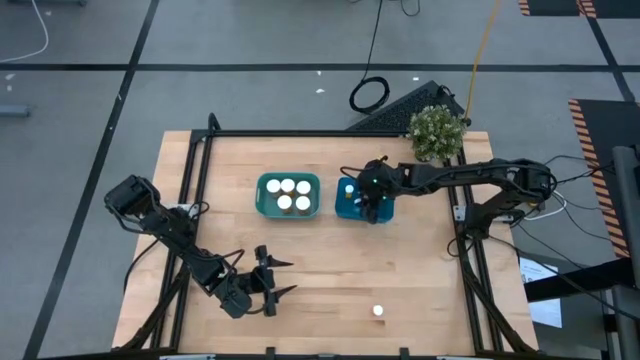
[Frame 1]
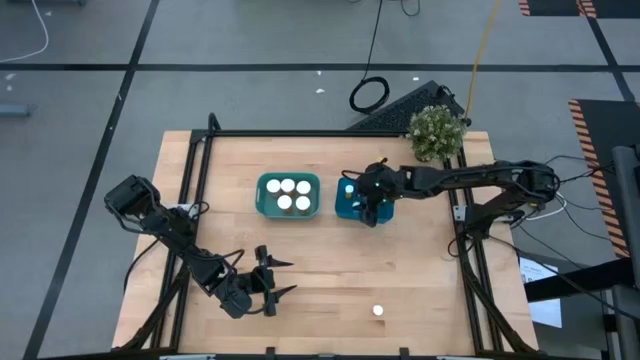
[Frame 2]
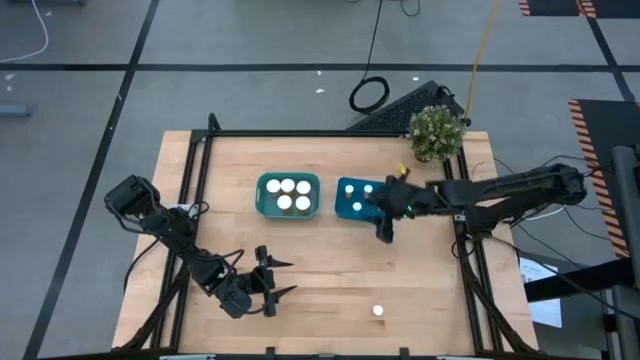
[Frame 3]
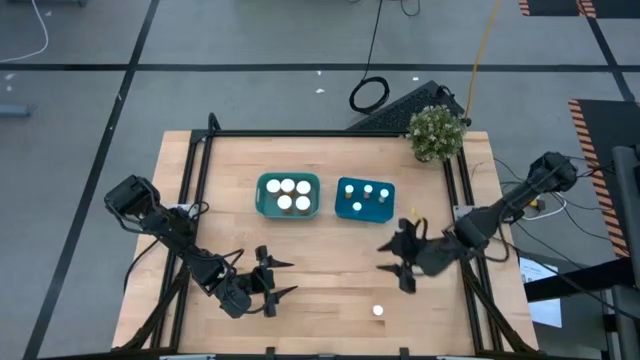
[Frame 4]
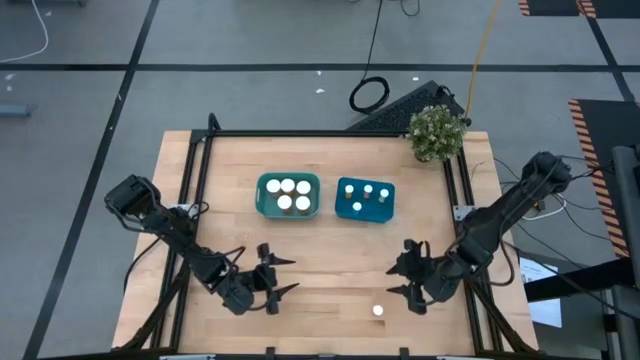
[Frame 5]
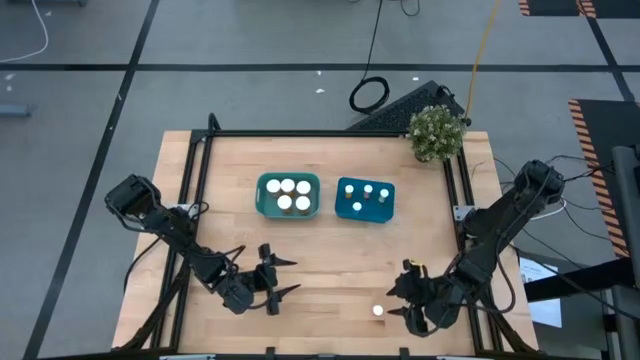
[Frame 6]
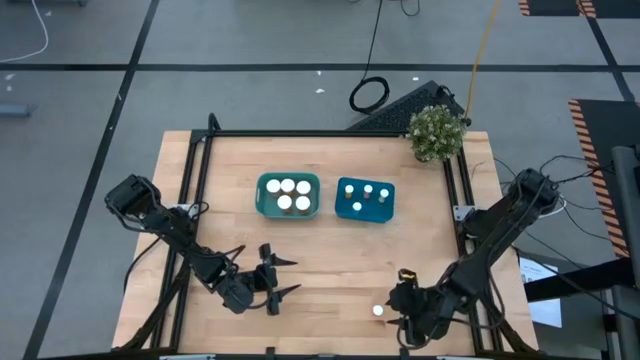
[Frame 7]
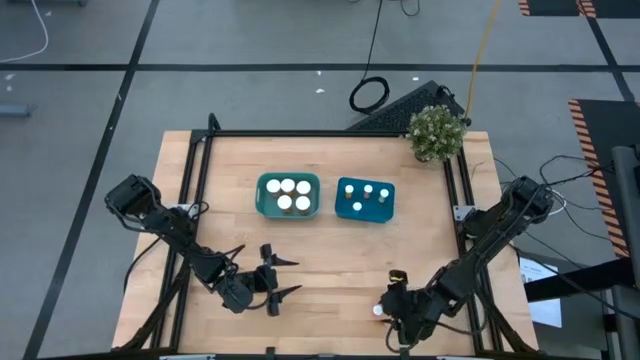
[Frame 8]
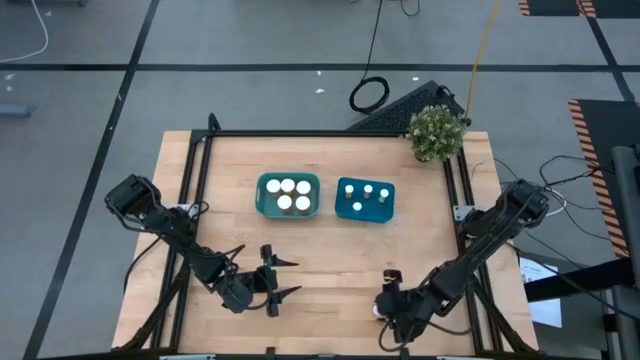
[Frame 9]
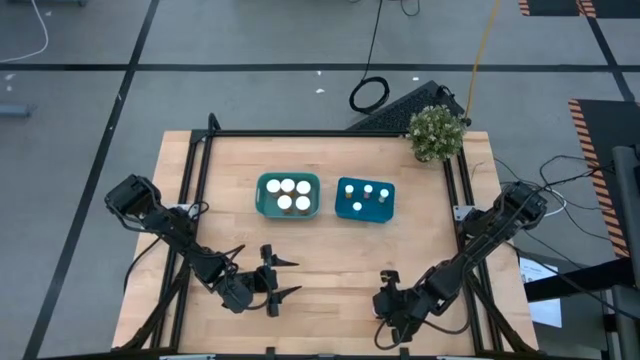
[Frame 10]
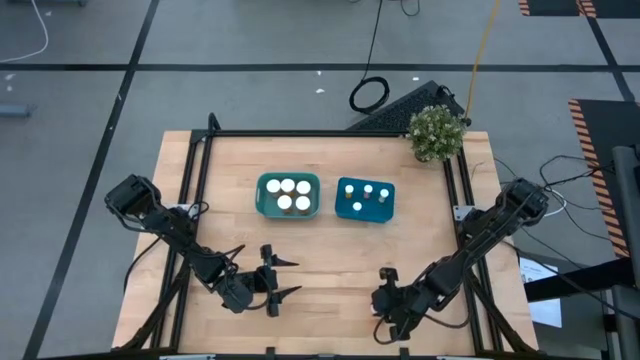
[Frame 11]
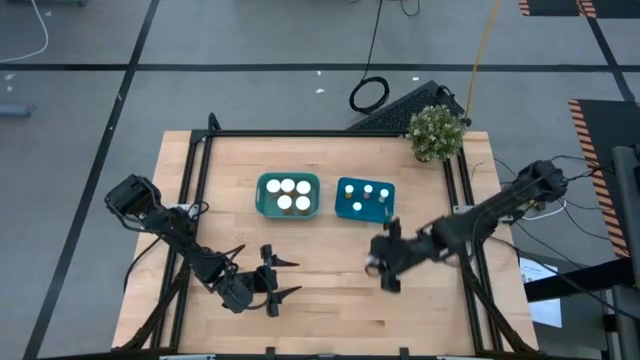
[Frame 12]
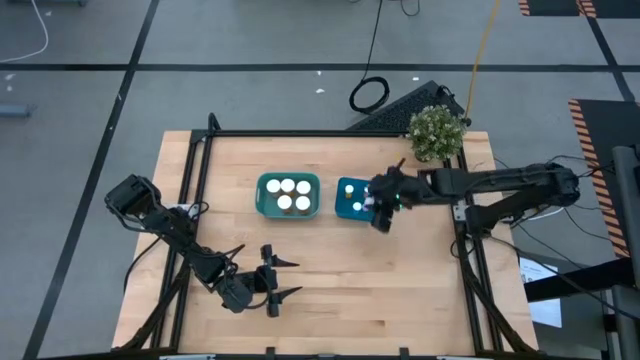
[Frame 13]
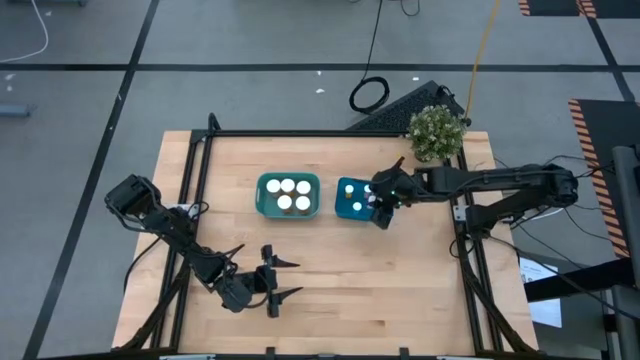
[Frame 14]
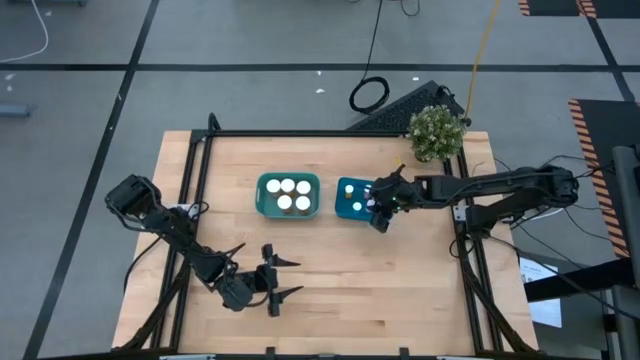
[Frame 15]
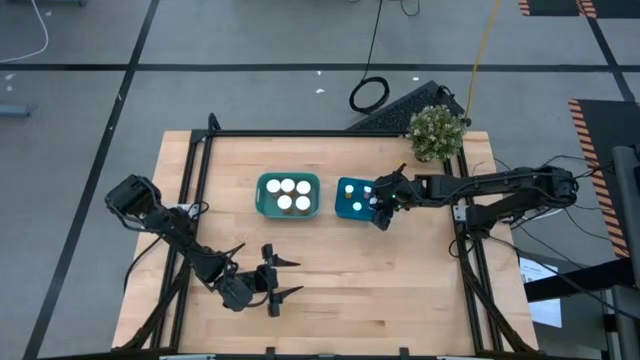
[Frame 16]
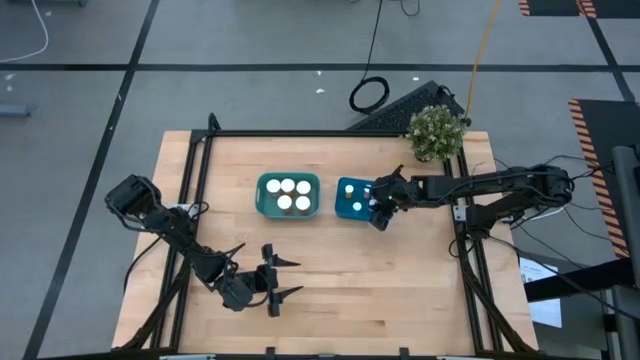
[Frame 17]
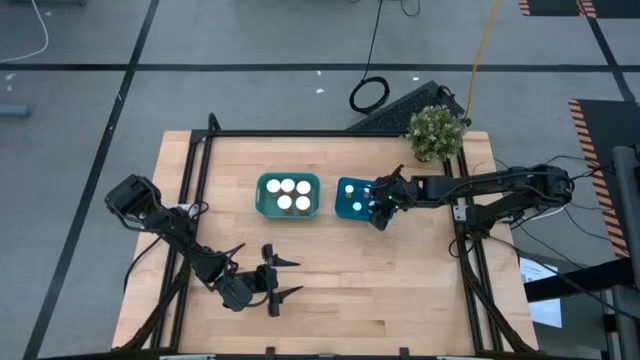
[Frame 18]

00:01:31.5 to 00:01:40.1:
Task: Pick and place medicine bottles into bin by pill shape (circle, oval)
Put the small pink tablet bottle into the blue bin

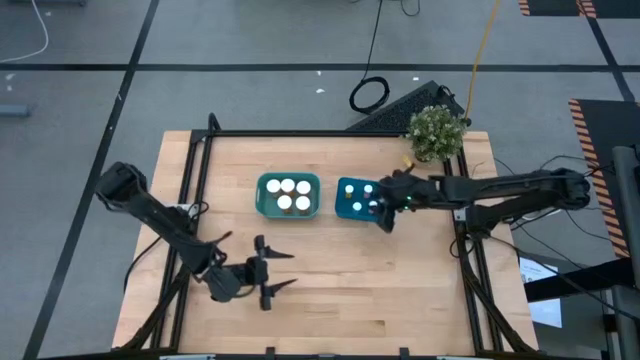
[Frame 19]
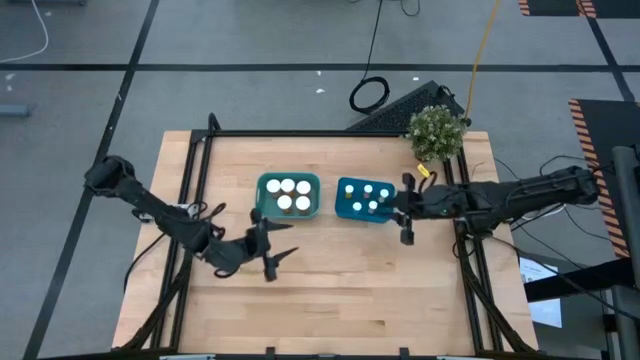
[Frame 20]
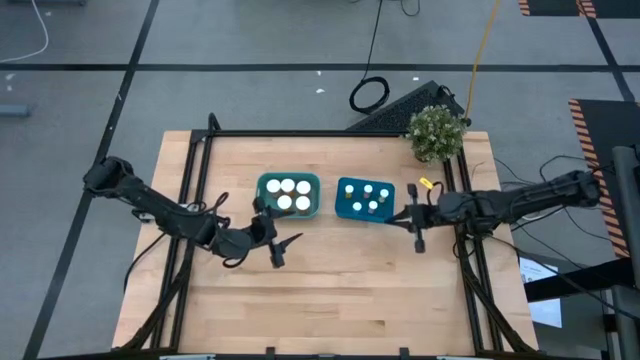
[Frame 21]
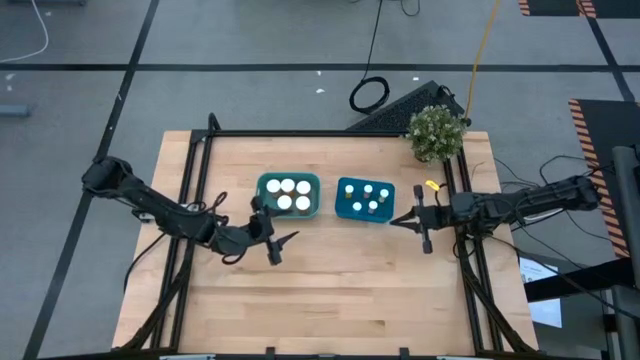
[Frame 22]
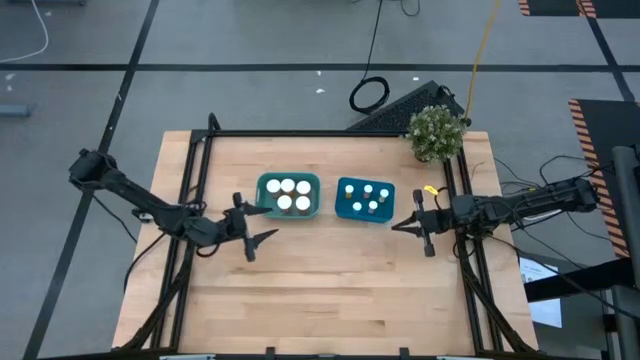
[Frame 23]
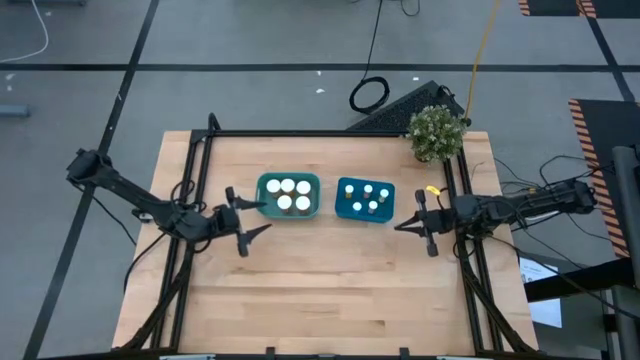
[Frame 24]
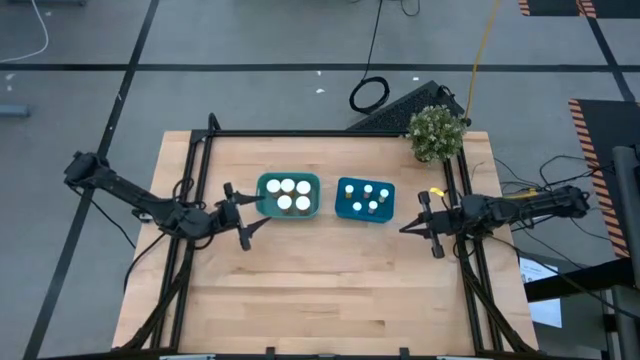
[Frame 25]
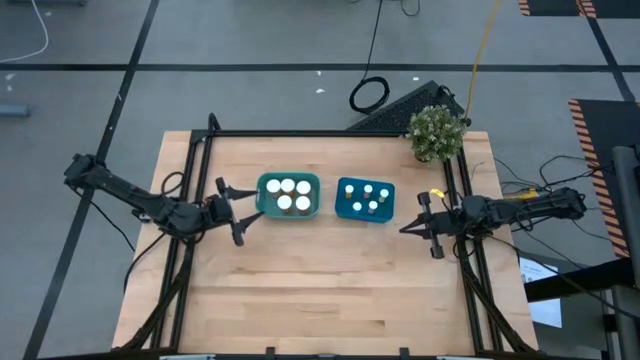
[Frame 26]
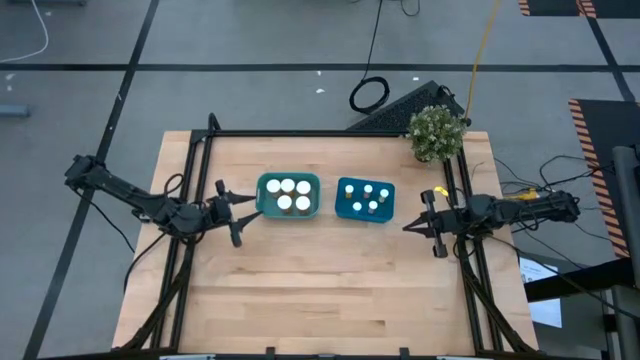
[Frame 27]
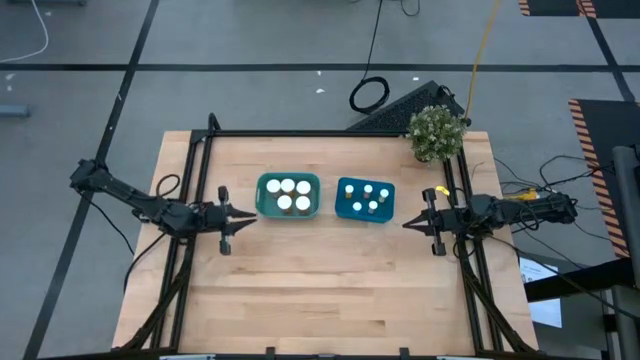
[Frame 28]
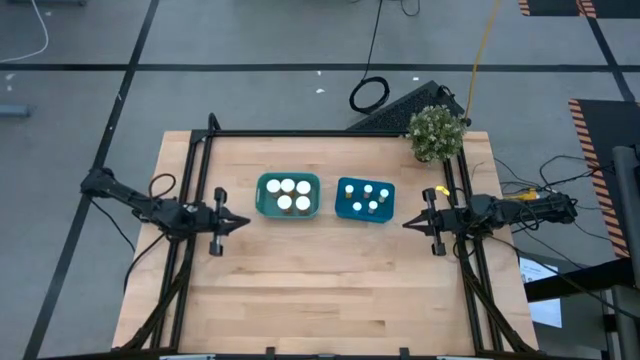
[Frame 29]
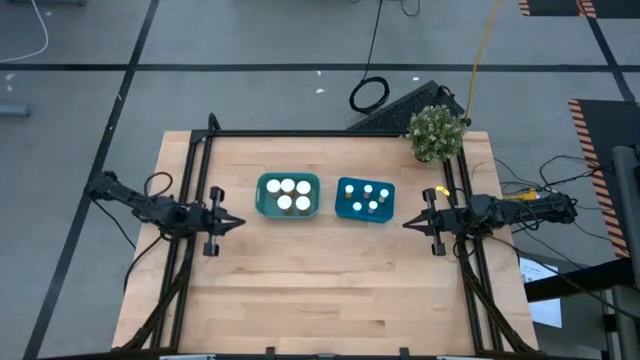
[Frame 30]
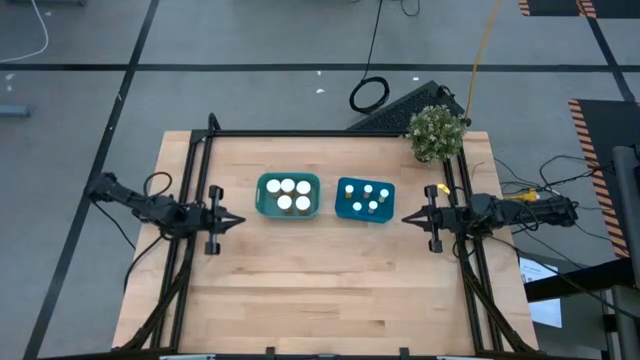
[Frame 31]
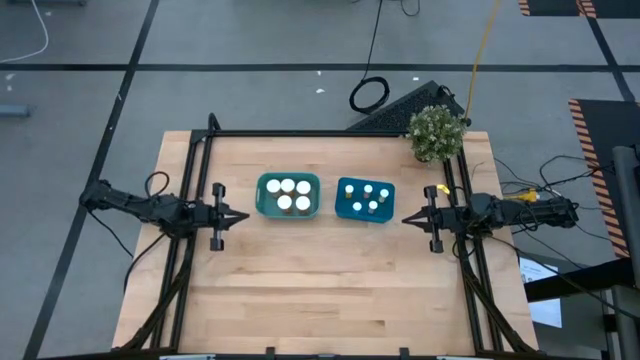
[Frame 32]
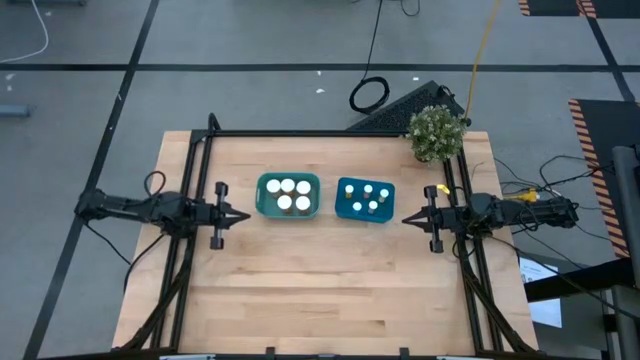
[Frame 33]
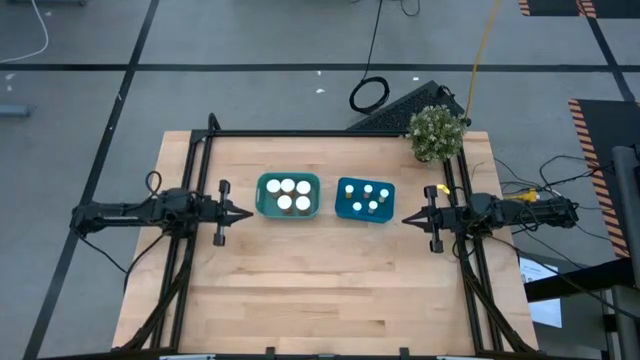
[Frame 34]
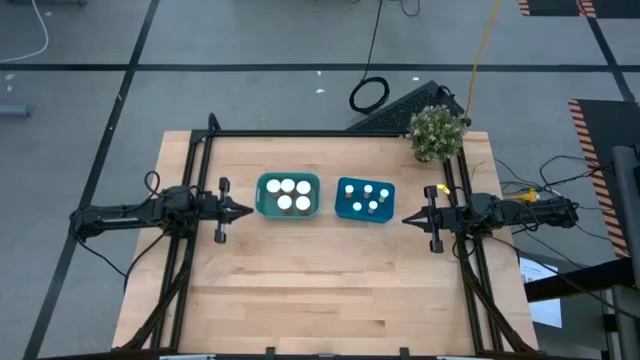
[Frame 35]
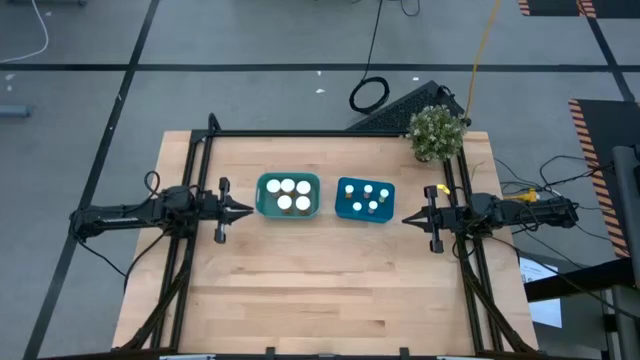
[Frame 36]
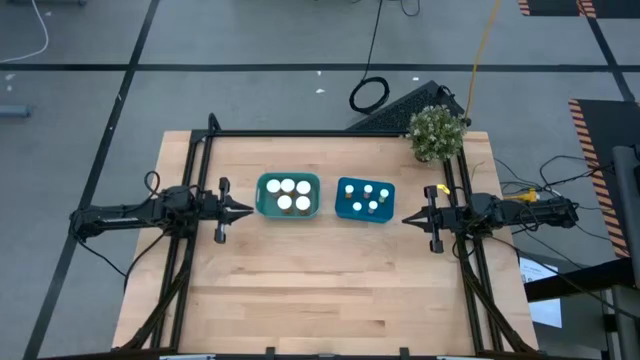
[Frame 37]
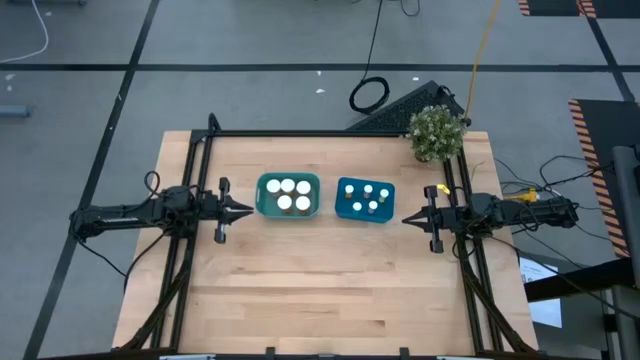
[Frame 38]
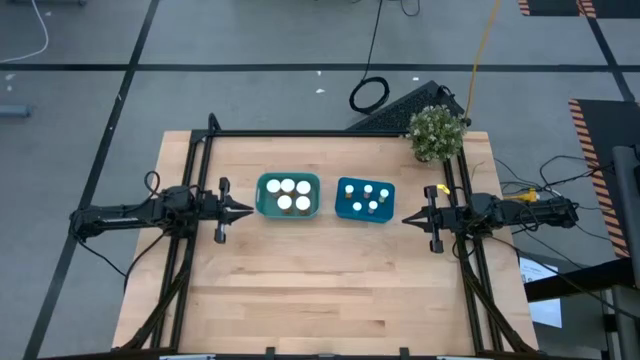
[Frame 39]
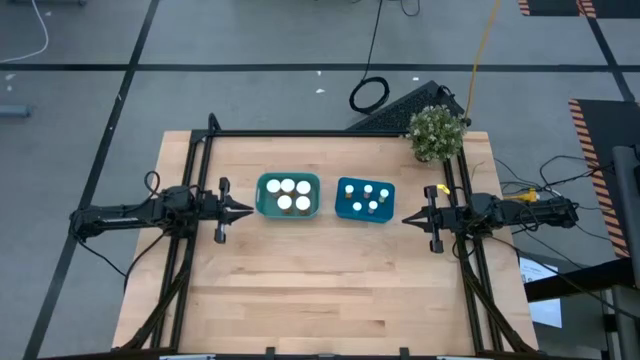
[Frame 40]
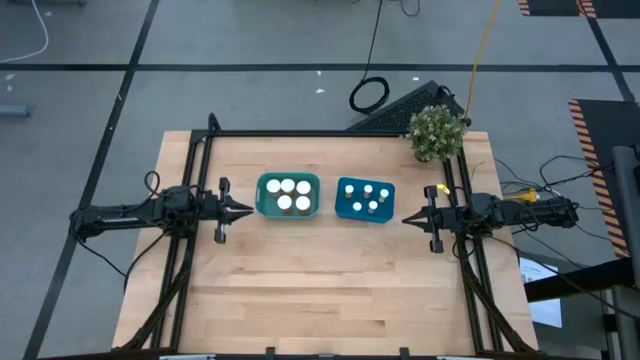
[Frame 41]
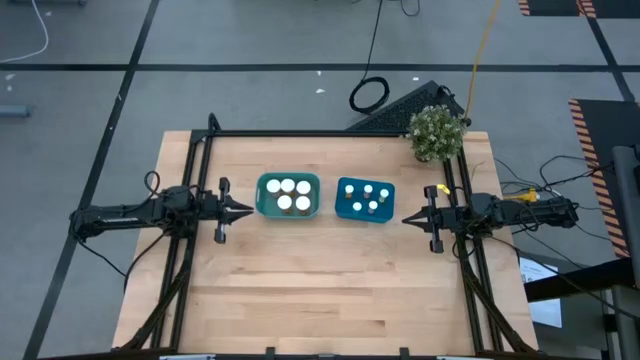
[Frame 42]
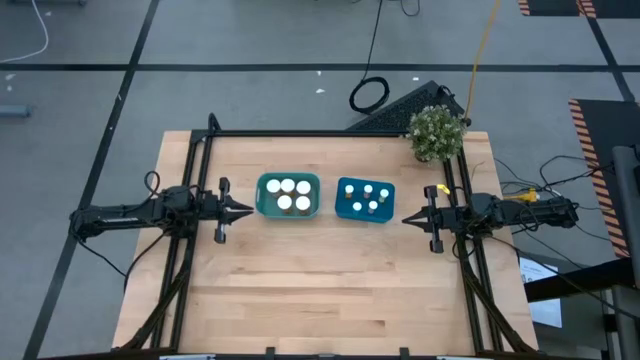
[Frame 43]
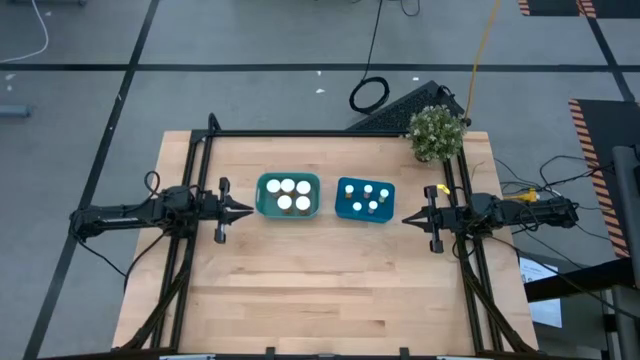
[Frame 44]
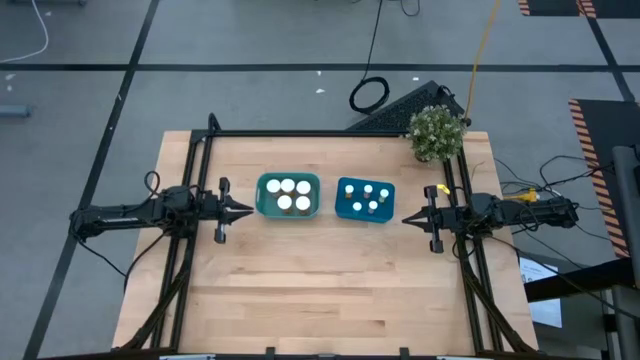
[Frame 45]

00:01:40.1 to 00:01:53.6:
Return to Home Position
